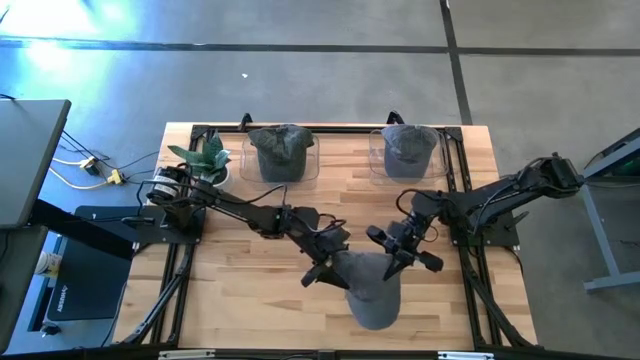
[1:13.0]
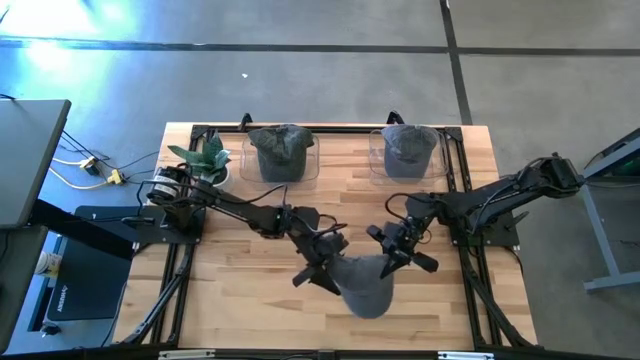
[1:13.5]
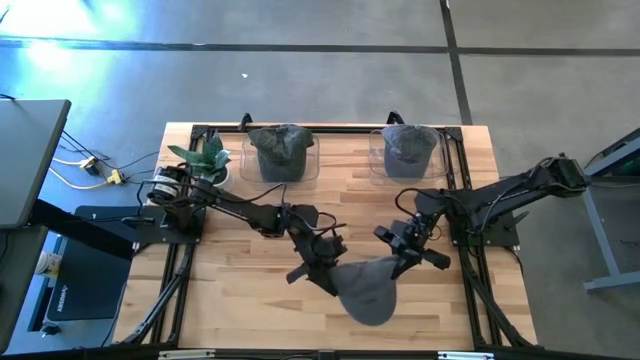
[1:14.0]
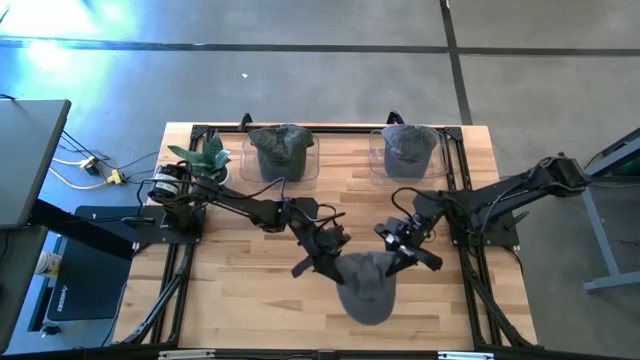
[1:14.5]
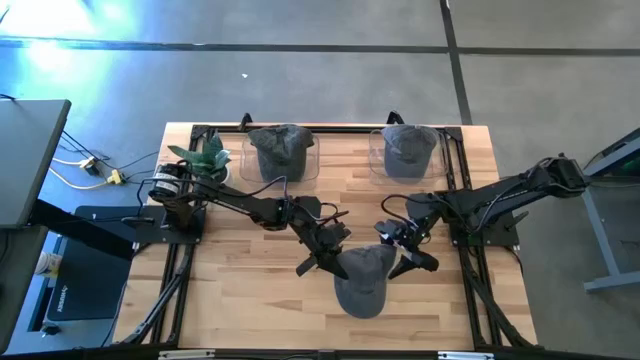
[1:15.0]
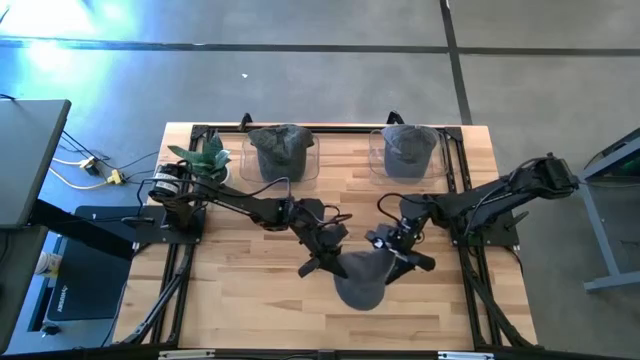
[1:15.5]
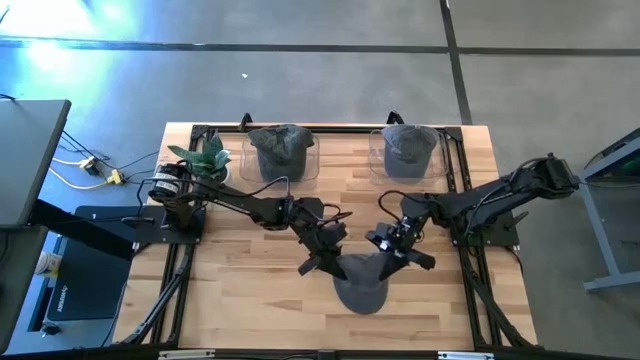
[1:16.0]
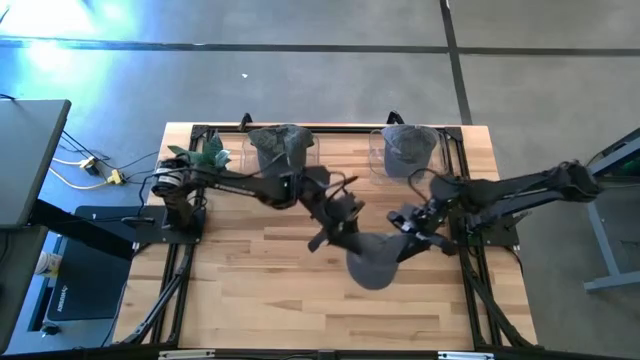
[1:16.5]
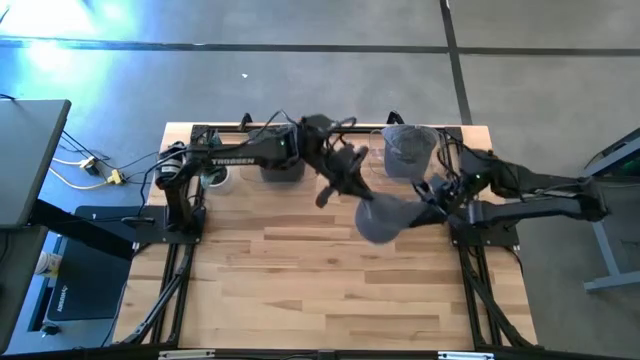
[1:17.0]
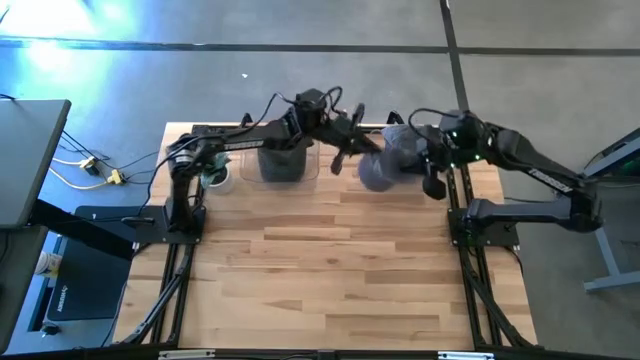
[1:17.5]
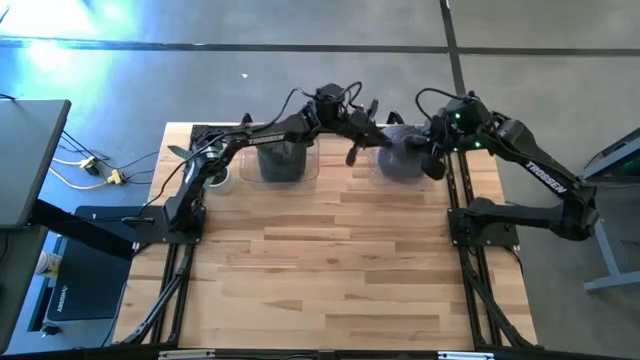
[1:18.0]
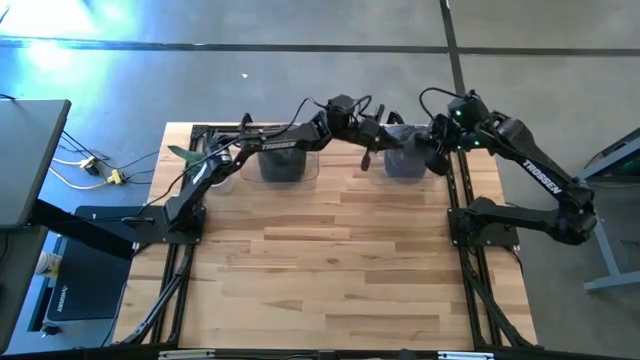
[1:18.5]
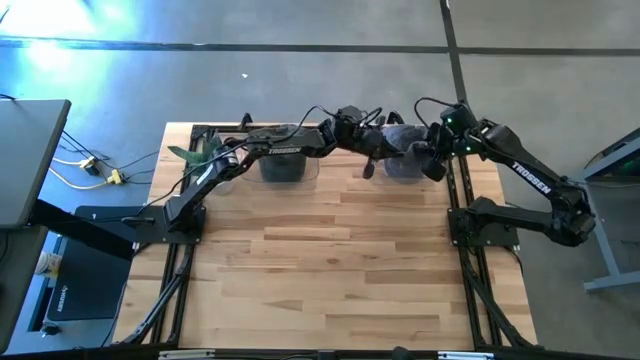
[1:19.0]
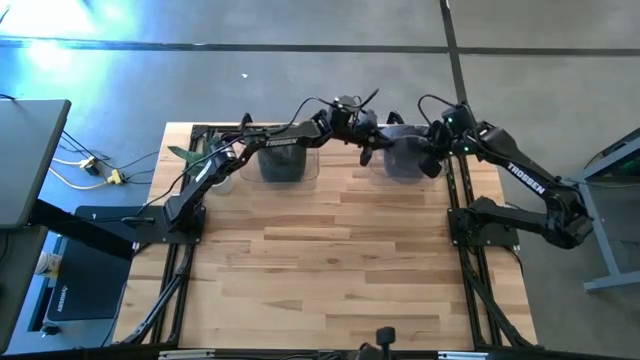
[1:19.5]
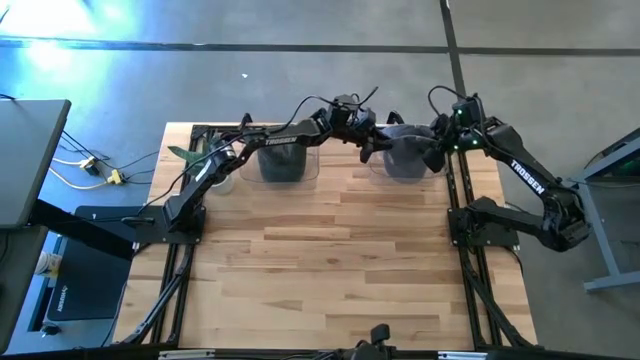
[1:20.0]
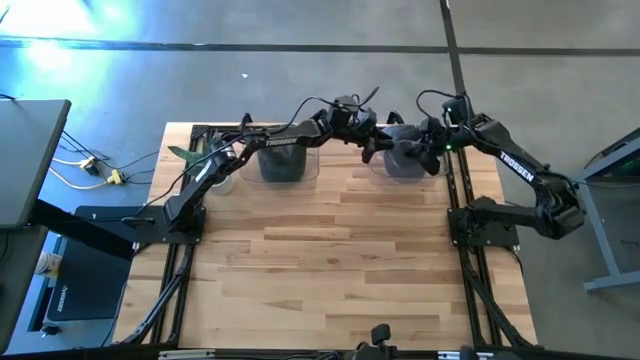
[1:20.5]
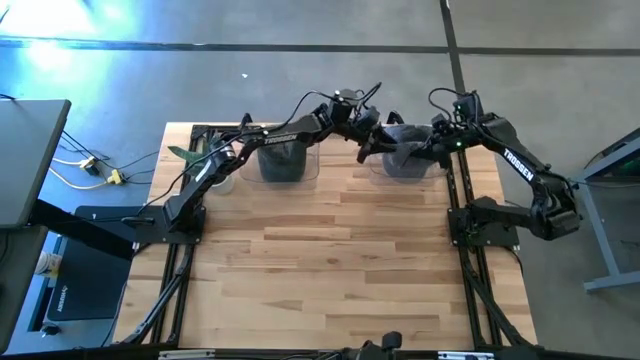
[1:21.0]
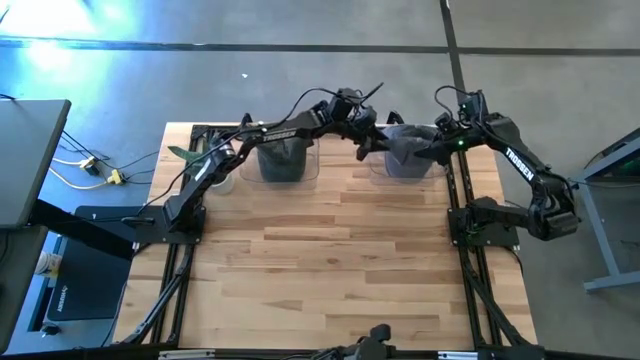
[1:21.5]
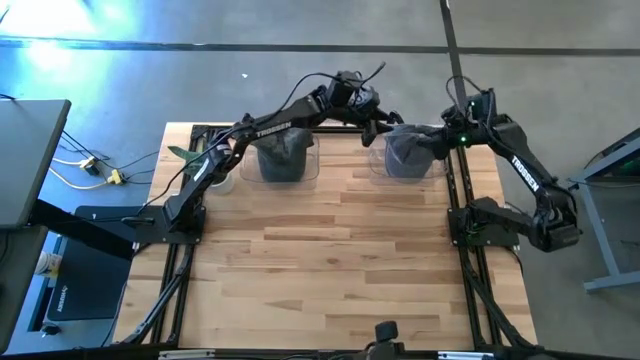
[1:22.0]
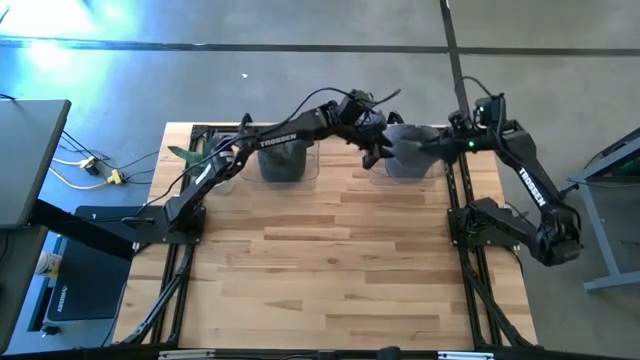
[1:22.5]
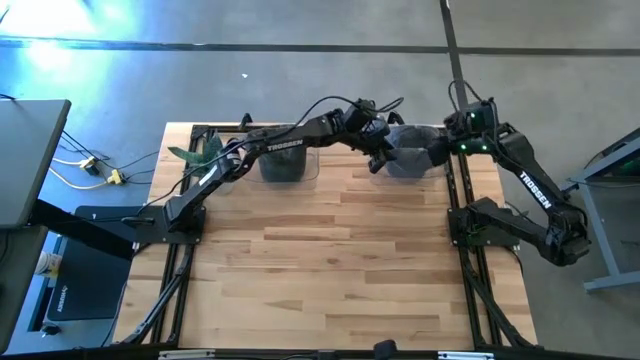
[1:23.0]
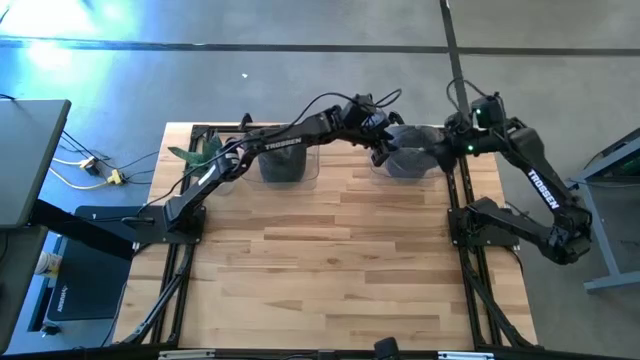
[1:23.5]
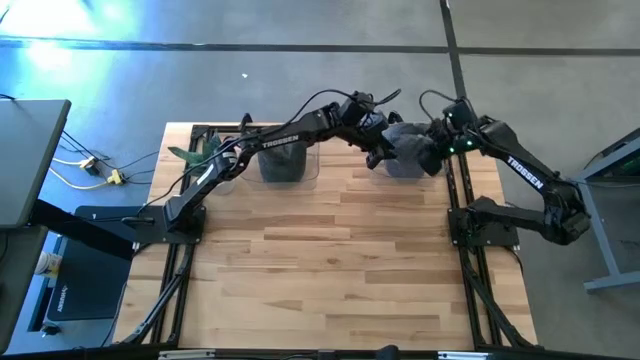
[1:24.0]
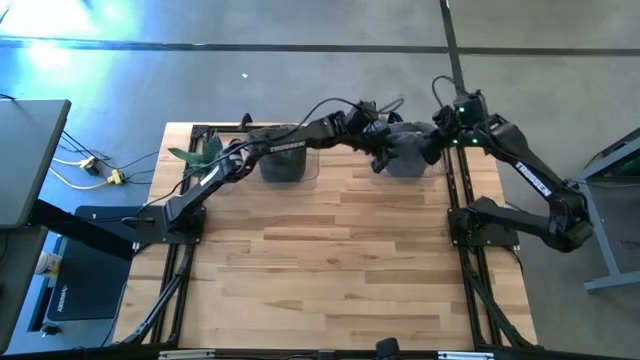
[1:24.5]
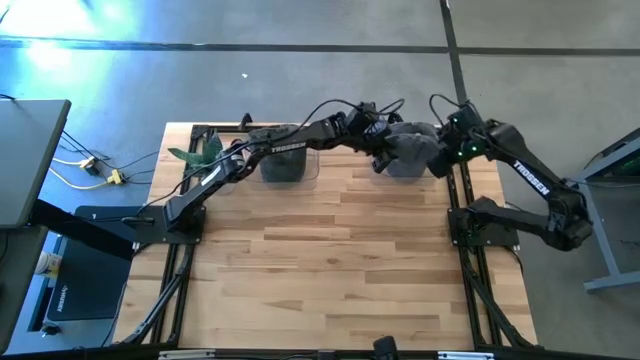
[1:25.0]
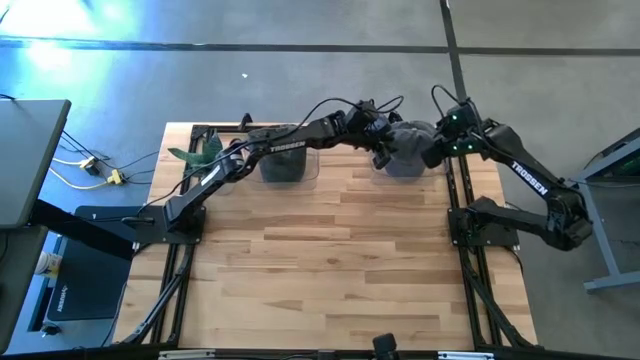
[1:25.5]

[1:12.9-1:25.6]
Task: Pick & Place hat
Put the gray cap into the right transparent bin

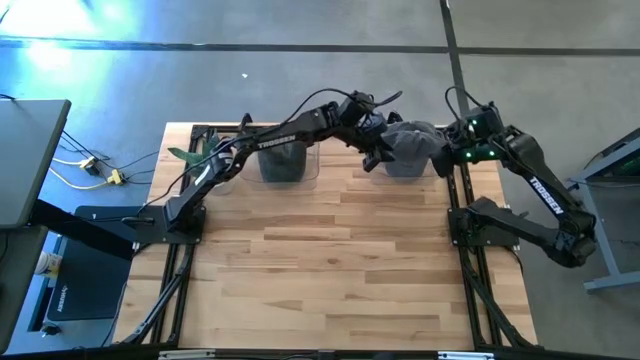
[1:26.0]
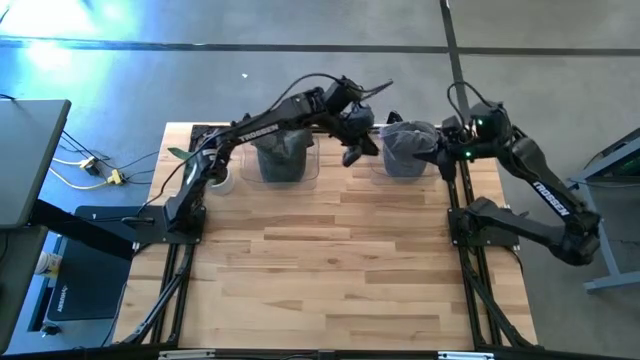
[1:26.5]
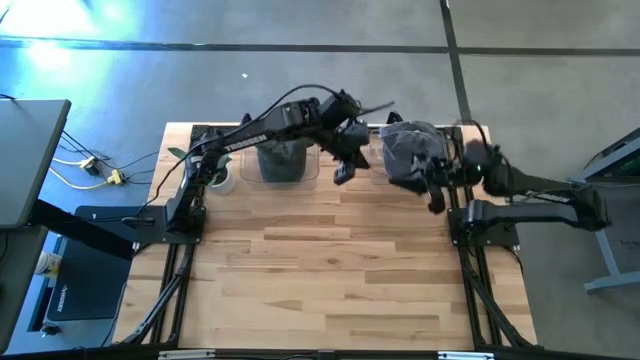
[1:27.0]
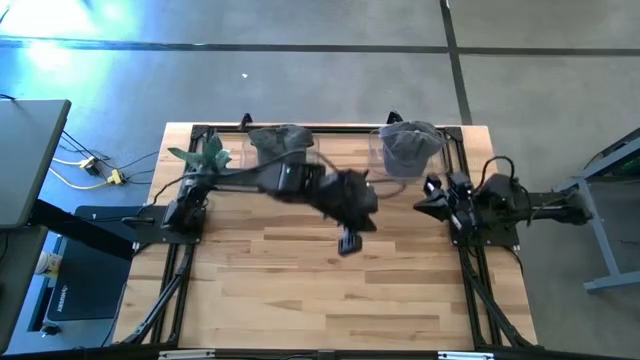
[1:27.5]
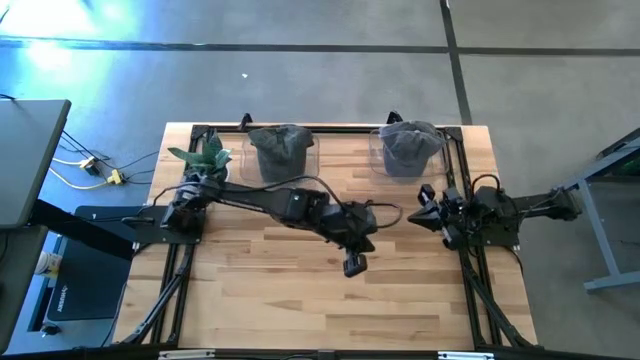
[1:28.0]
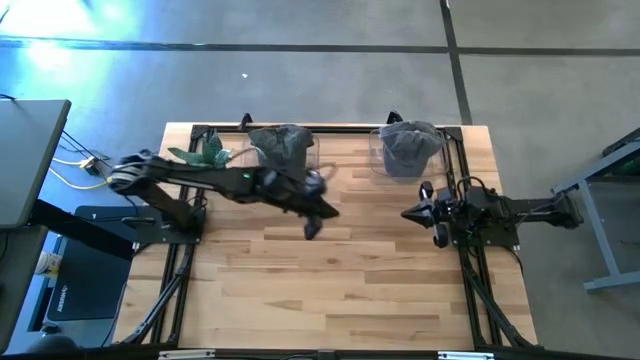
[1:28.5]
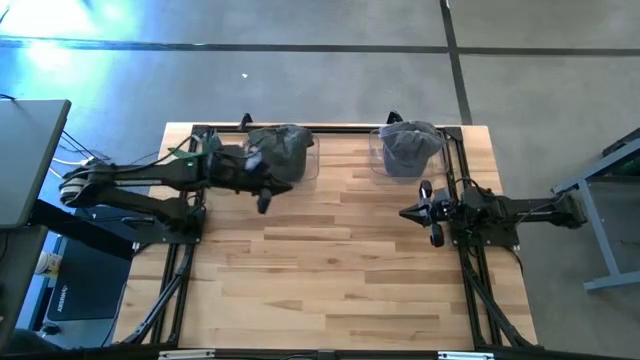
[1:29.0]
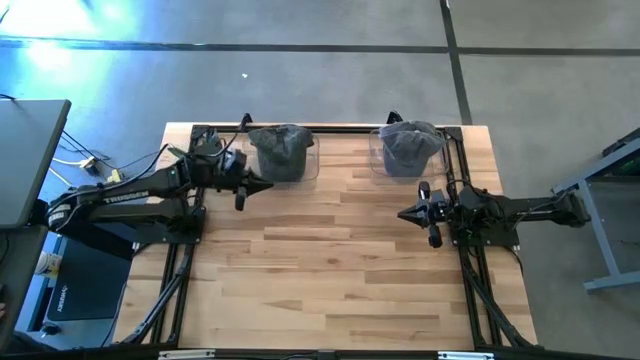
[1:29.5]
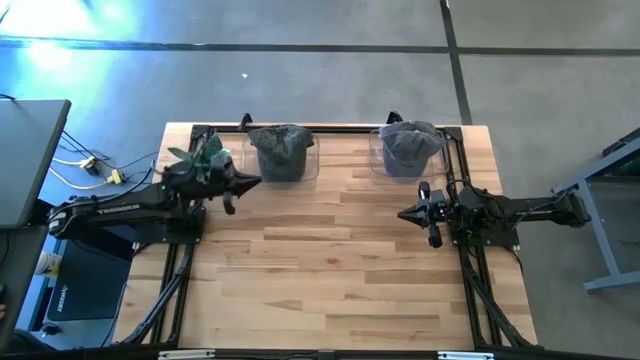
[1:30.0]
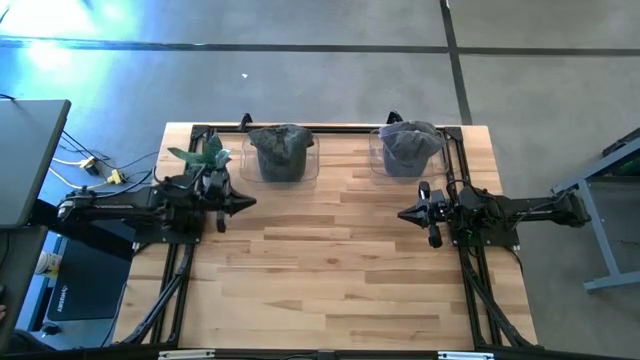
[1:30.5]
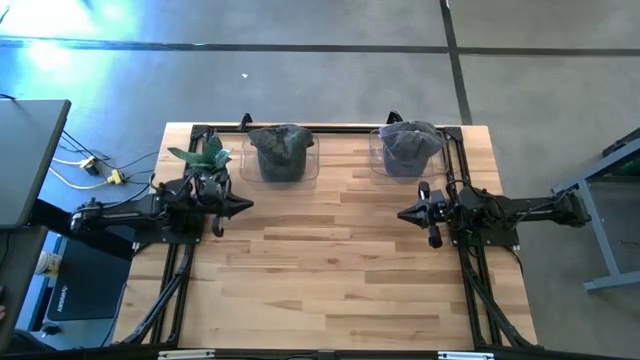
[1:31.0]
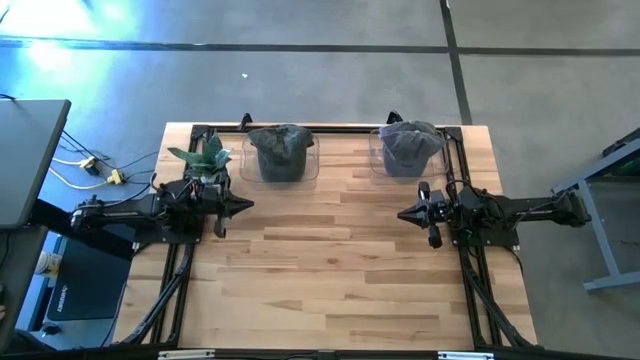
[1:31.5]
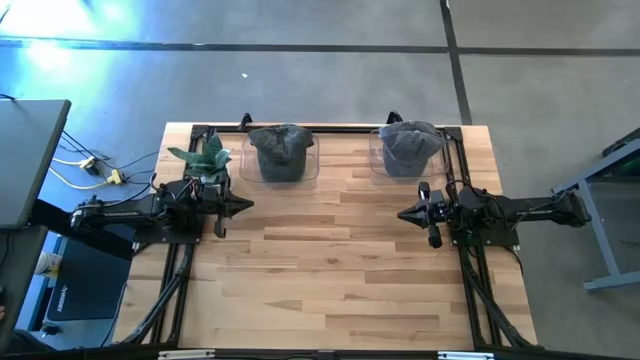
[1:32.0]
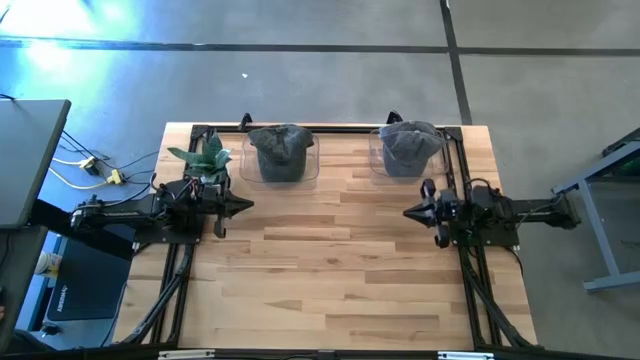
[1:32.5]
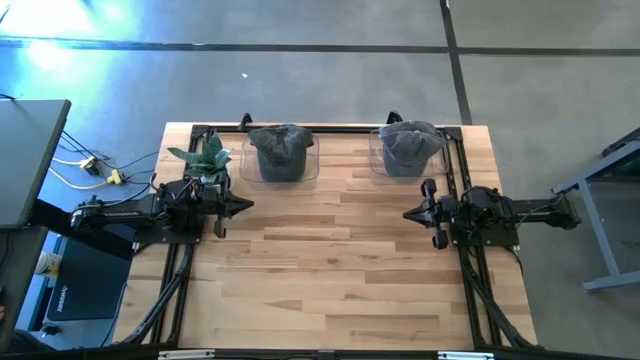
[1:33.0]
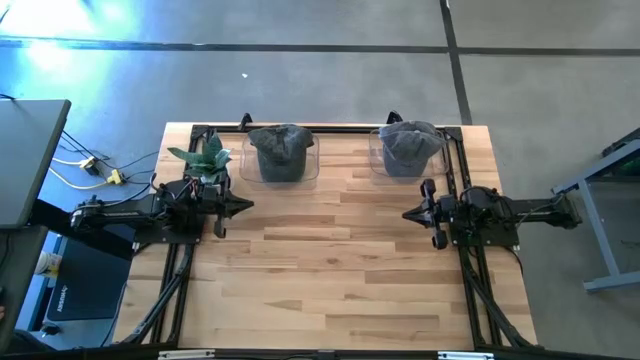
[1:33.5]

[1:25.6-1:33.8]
Return to Home Position
